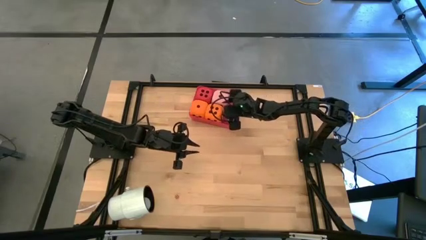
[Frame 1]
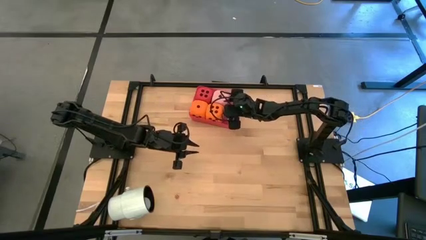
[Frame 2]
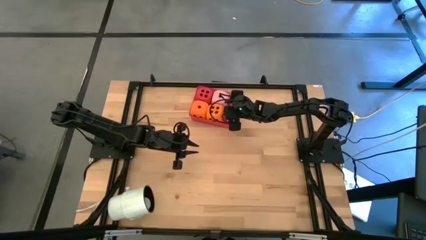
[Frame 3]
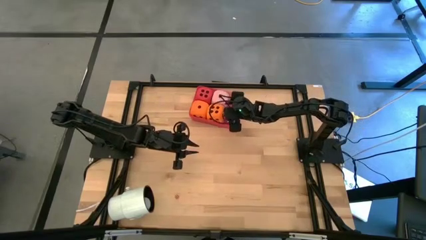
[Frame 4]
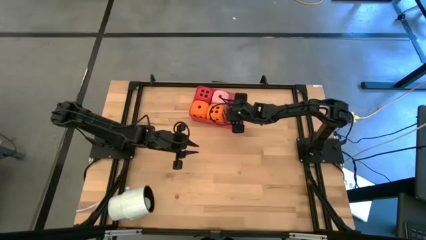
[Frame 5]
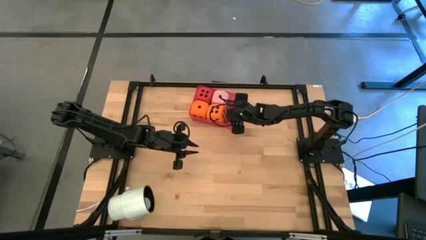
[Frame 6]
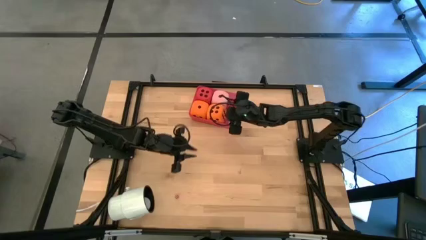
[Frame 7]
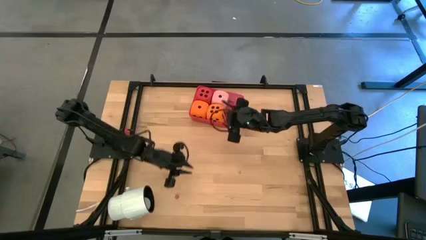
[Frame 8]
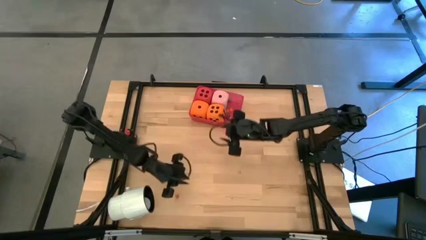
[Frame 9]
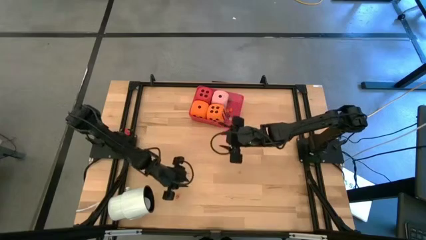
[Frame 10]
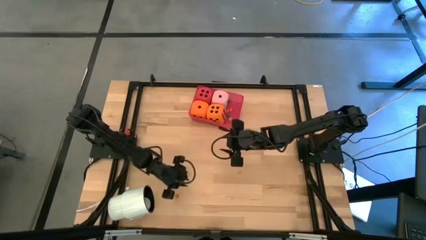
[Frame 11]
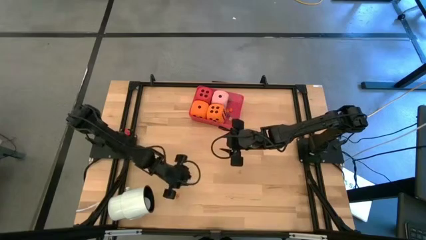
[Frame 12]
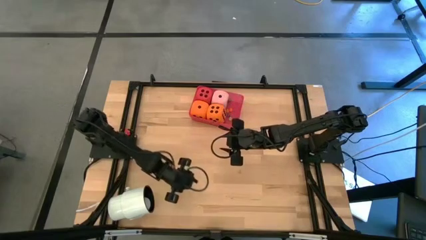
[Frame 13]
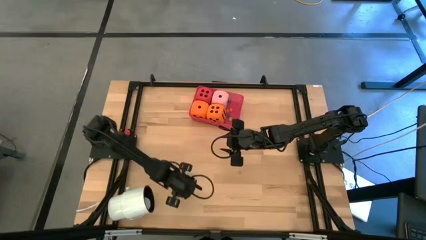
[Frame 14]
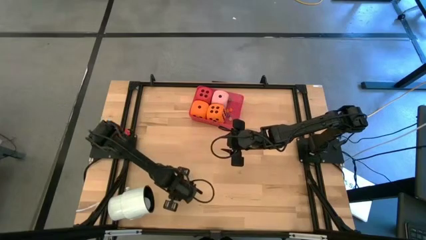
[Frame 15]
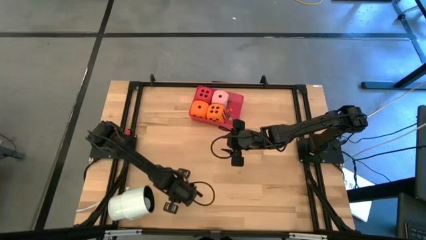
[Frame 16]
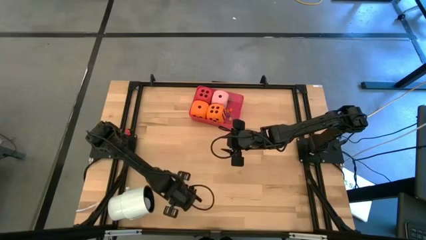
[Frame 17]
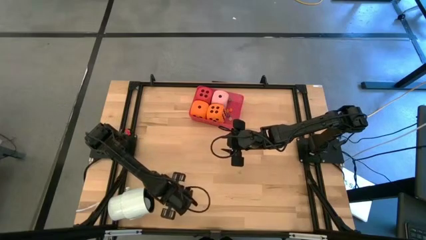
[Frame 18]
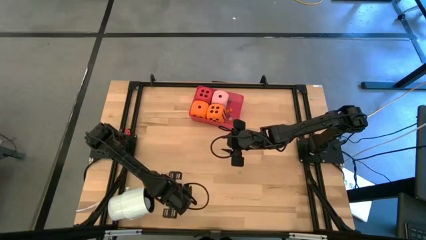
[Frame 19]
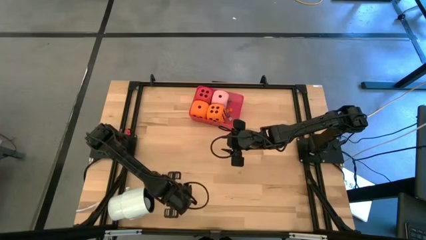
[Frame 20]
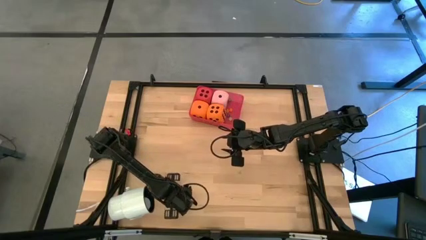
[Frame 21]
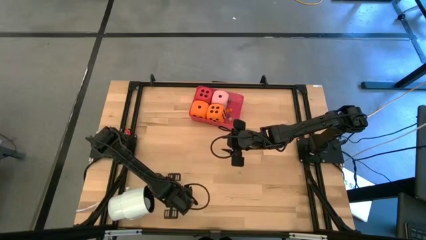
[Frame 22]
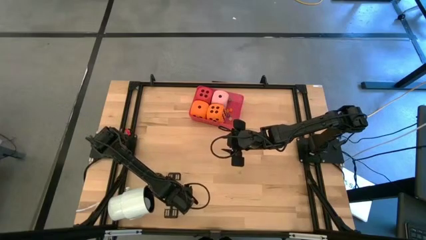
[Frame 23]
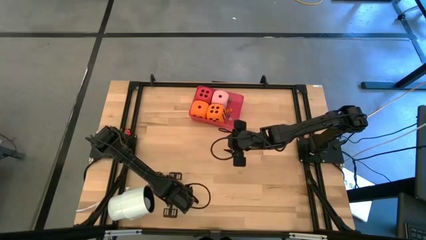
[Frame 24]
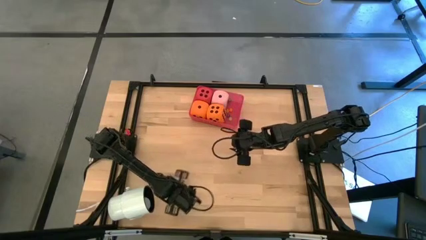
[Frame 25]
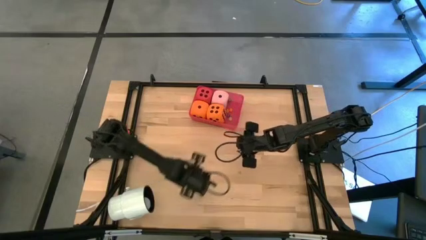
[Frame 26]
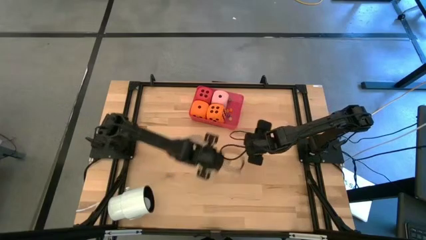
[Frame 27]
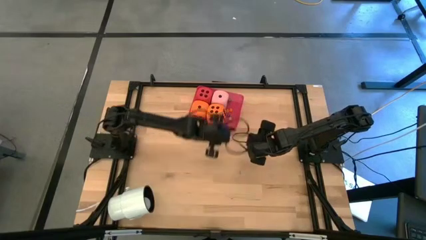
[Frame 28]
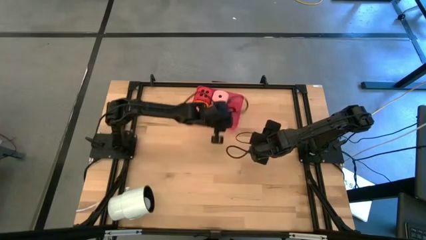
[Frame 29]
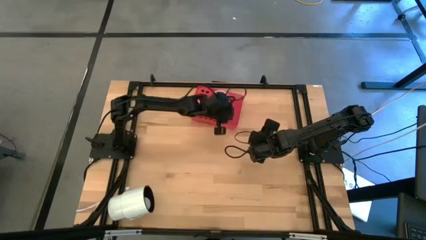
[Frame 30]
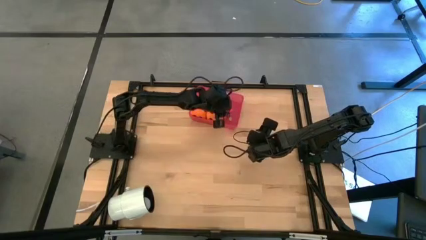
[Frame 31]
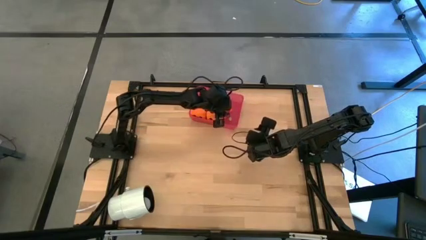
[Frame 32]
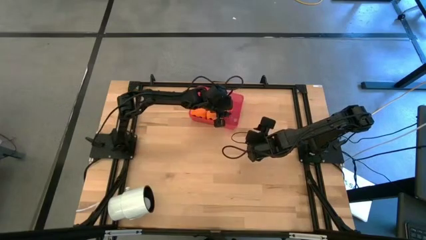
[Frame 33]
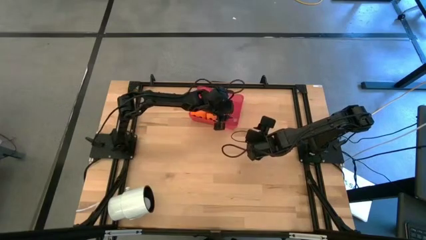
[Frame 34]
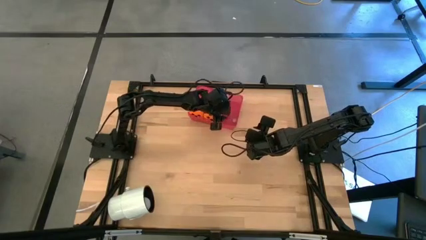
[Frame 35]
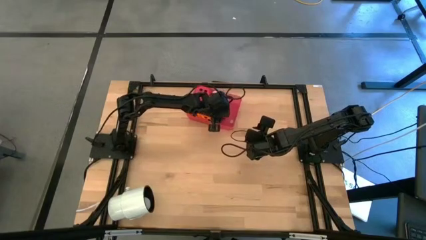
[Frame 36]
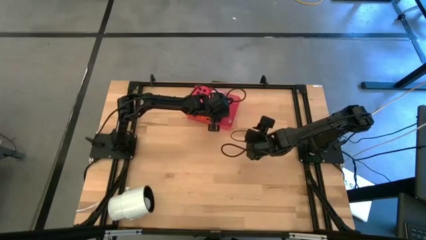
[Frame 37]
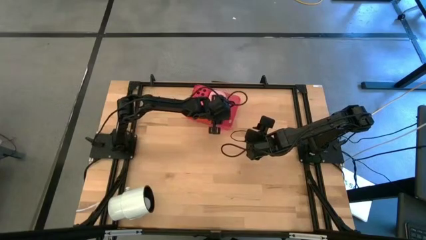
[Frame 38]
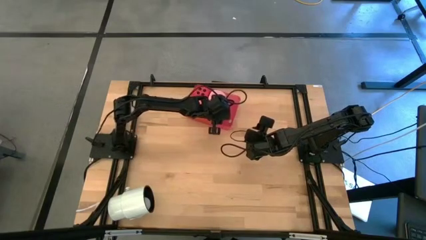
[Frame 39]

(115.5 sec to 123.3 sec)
Task: Pick & Place Dice
Put the small red dice into the red container

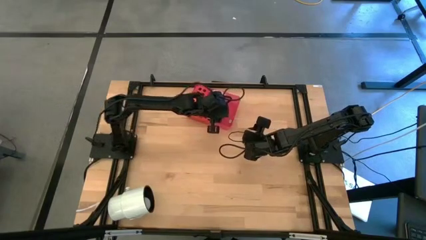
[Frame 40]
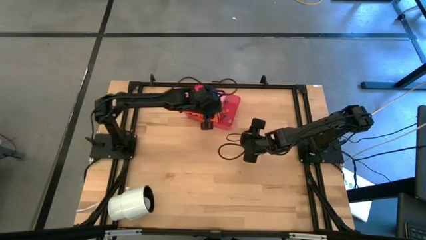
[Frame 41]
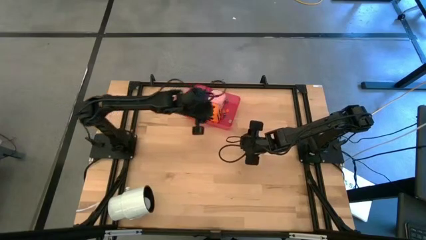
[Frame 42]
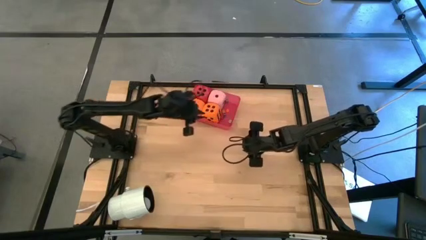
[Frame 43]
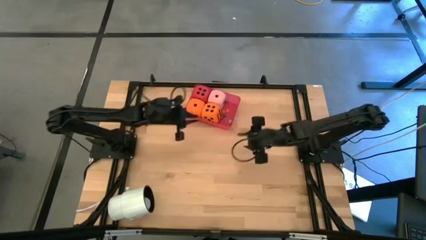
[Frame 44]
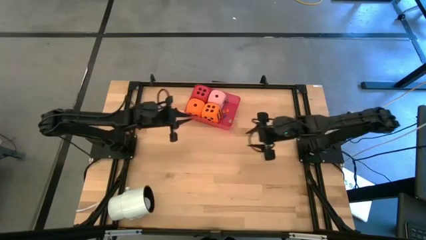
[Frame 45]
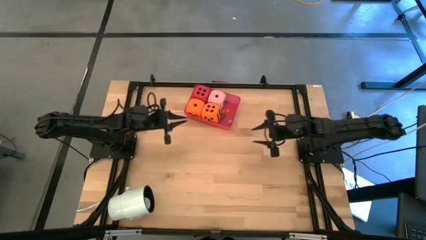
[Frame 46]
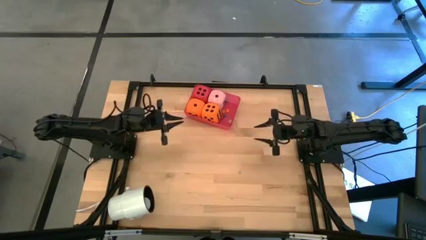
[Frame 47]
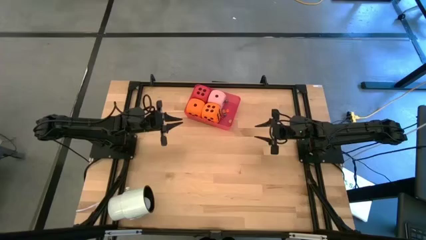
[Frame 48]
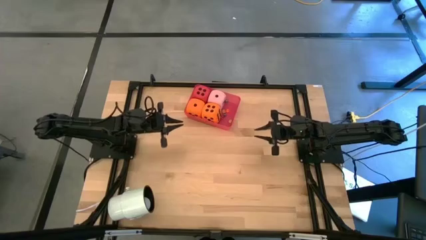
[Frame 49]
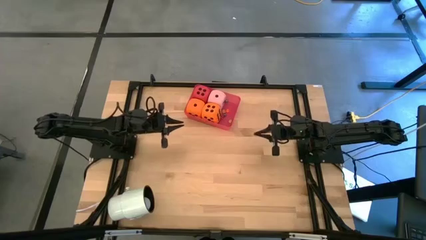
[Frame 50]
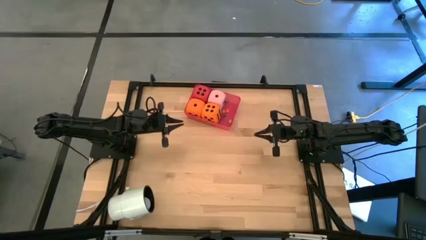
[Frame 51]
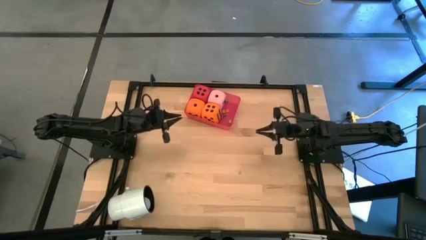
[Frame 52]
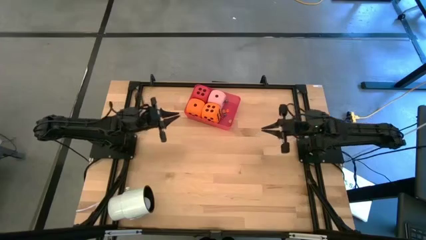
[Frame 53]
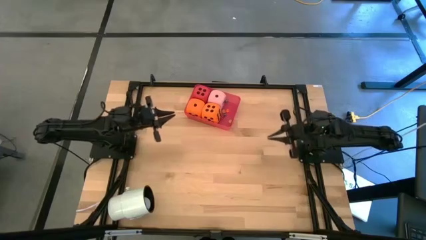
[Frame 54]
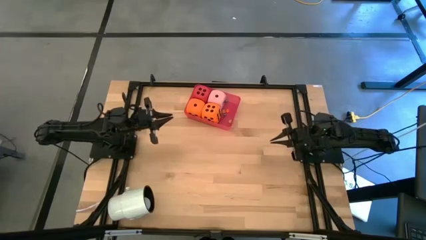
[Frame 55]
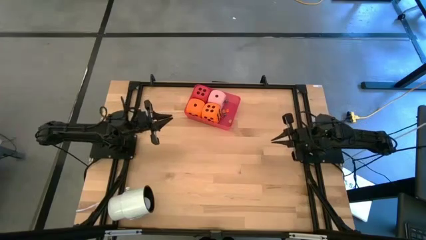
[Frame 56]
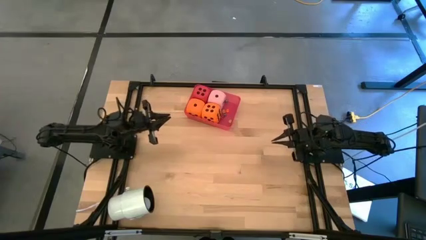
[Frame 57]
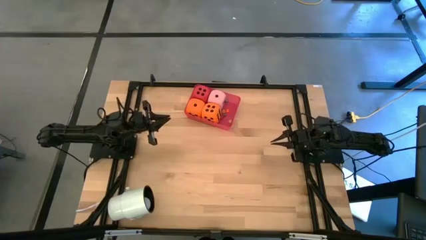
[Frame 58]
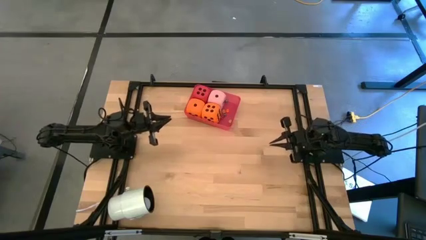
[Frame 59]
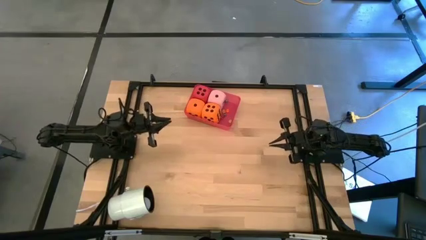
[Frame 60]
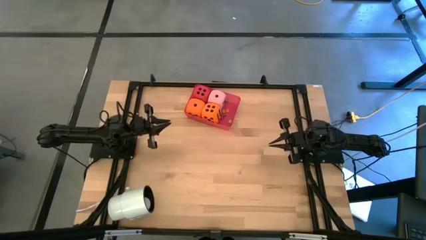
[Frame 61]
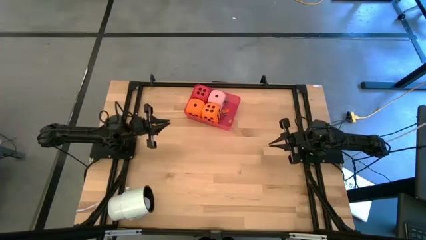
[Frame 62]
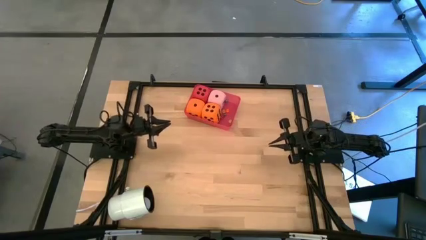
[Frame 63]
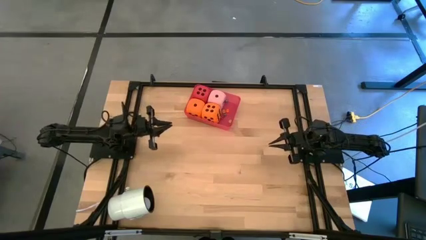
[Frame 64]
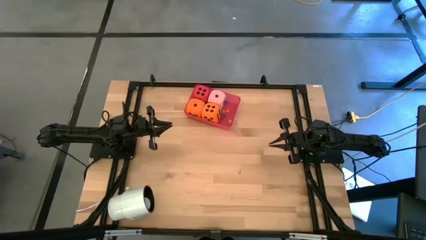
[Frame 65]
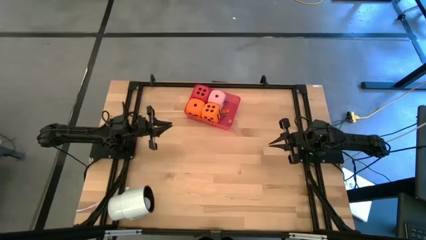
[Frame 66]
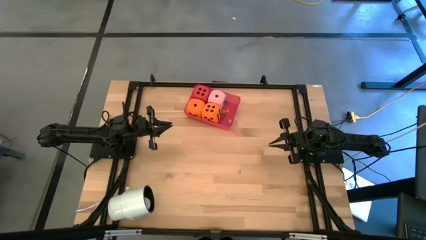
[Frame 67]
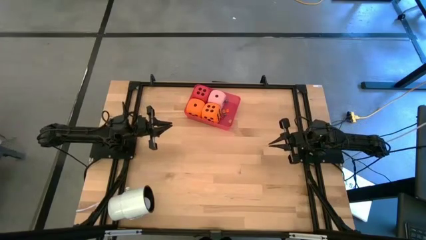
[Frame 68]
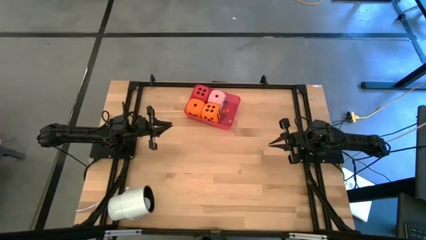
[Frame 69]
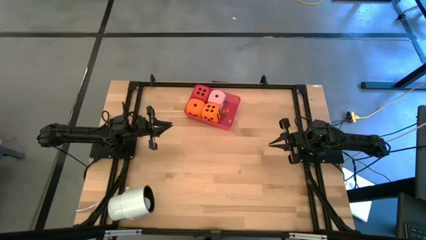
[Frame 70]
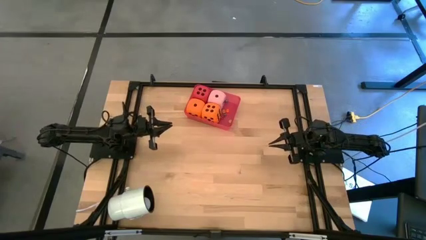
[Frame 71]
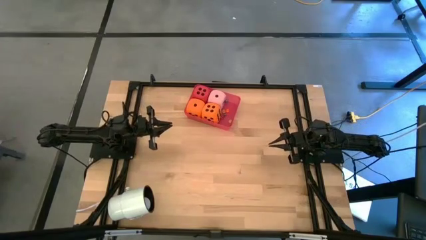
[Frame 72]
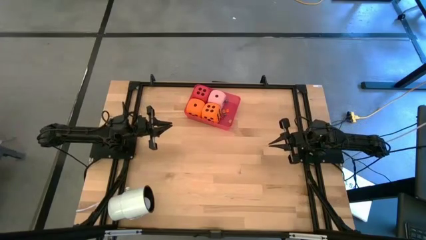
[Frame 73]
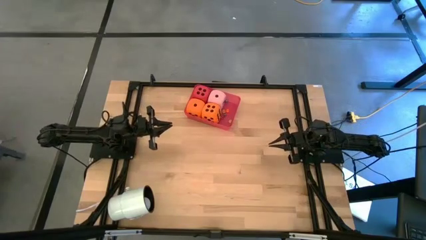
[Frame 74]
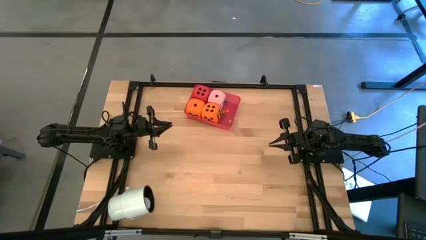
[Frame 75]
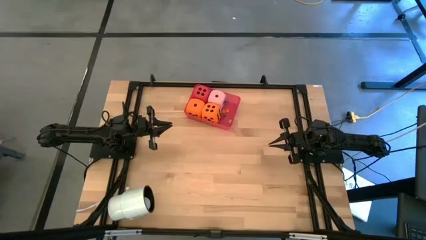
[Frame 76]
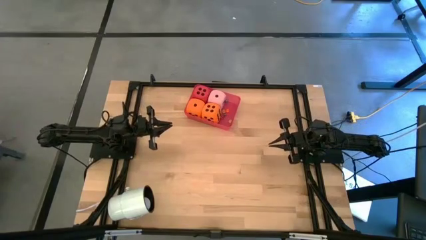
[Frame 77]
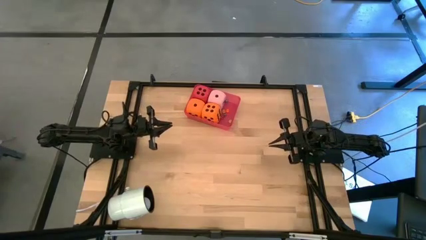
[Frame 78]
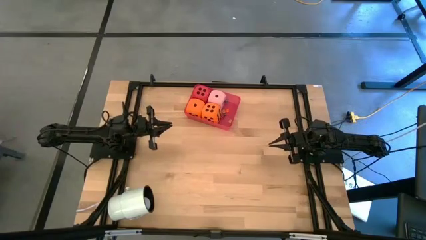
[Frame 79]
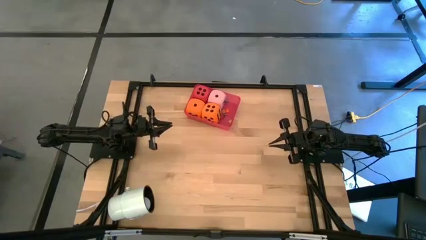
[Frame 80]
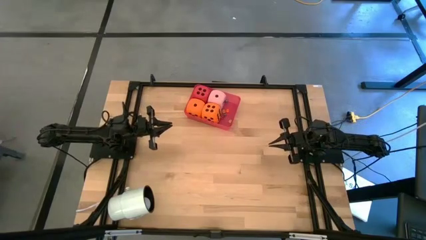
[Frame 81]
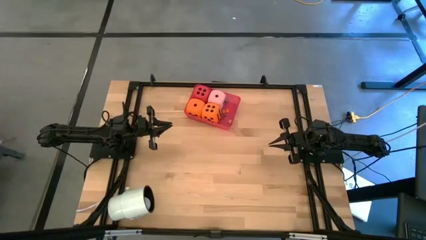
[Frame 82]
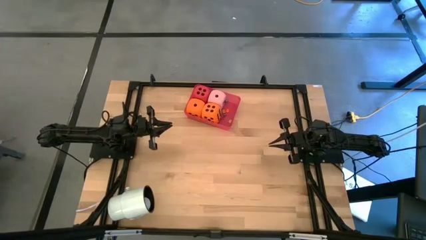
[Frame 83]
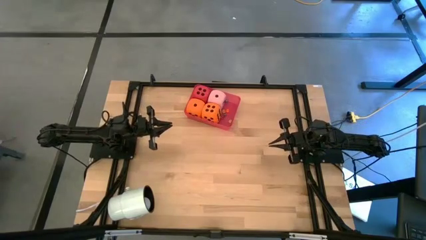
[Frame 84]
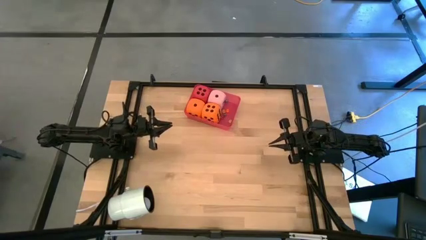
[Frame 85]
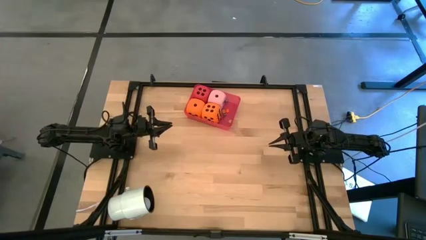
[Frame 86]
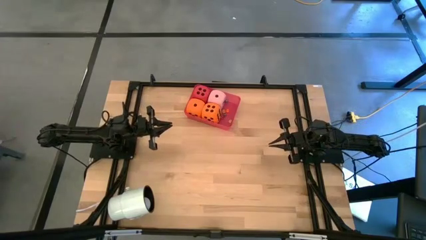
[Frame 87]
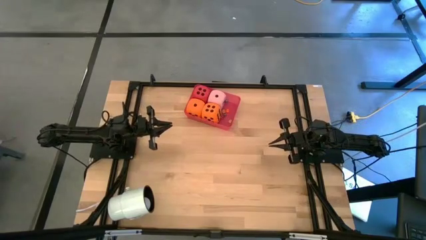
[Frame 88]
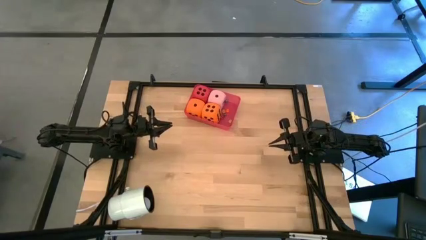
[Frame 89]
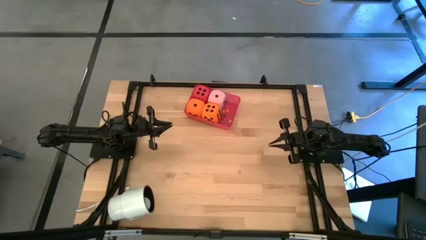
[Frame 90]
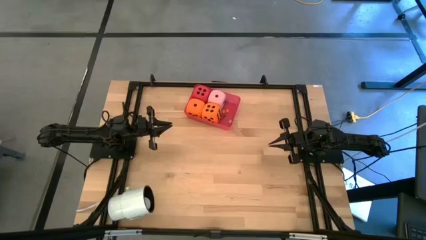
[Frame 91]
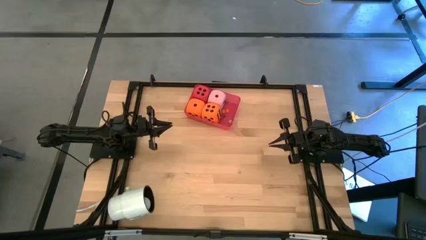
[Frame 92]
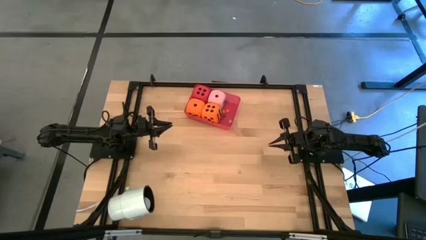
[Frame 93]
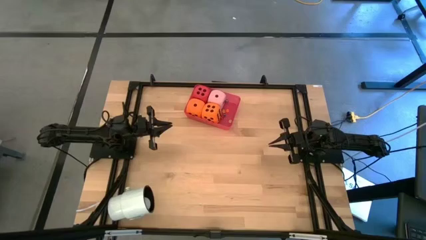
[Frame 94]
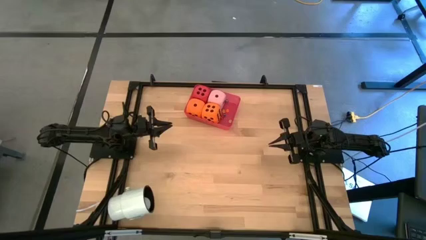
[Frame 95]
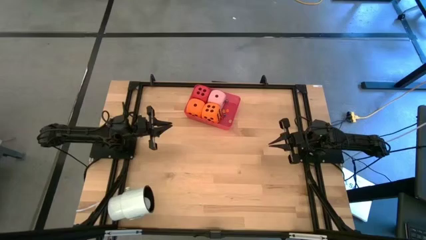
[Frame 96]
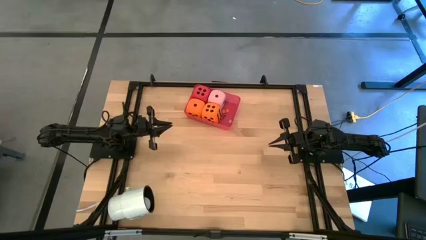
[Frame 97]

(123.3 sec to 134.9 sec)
Return to Home Position
